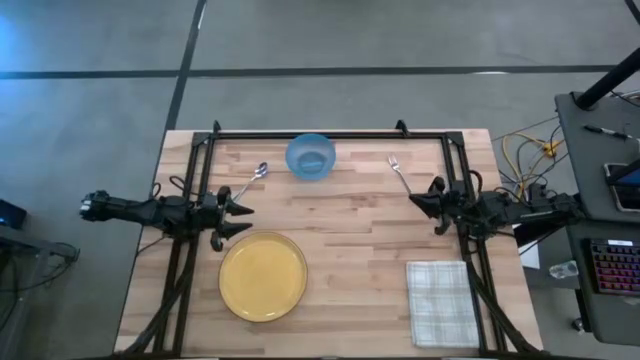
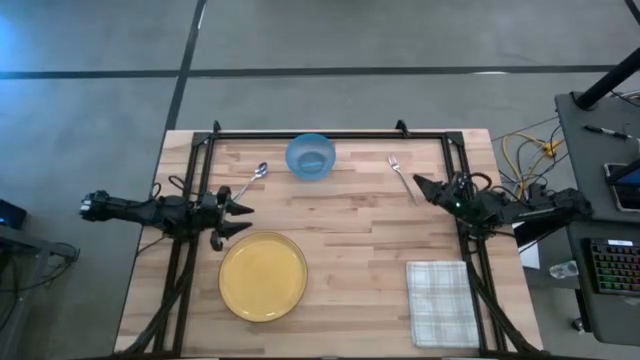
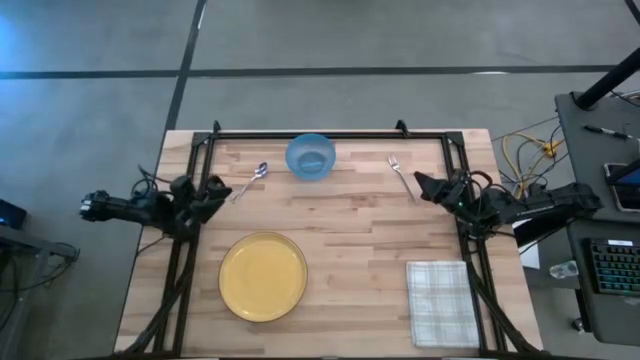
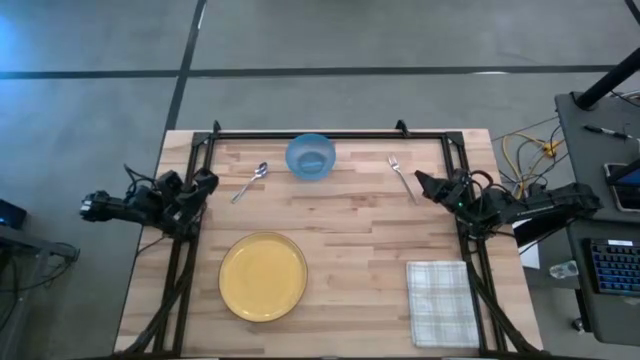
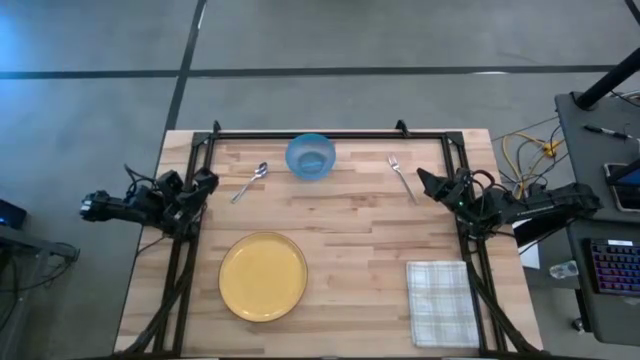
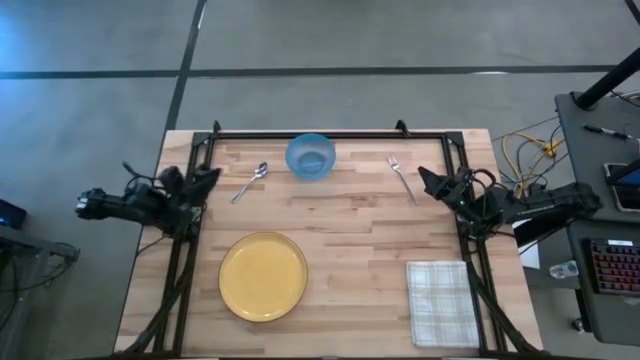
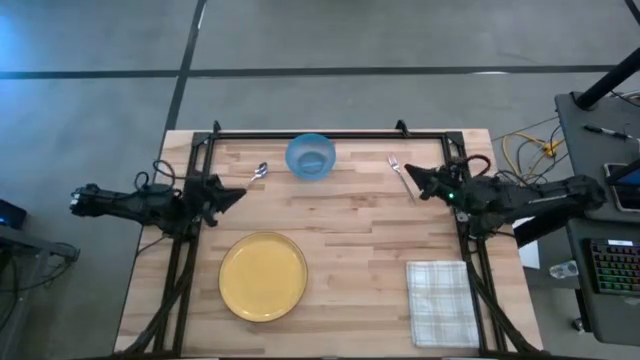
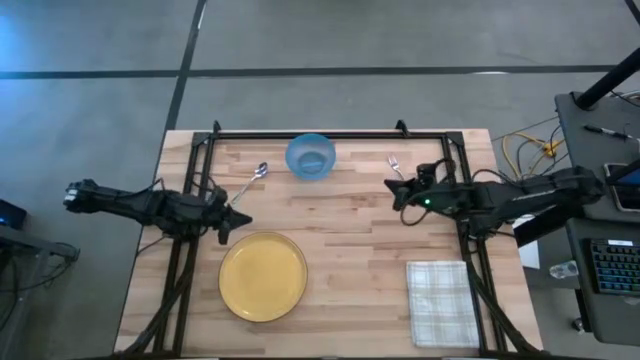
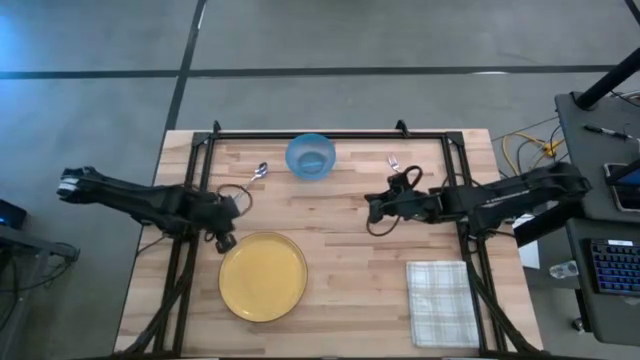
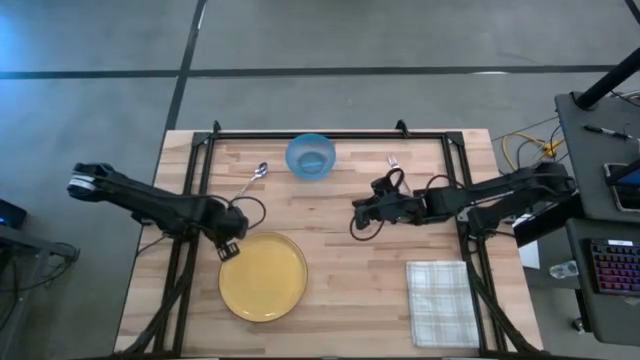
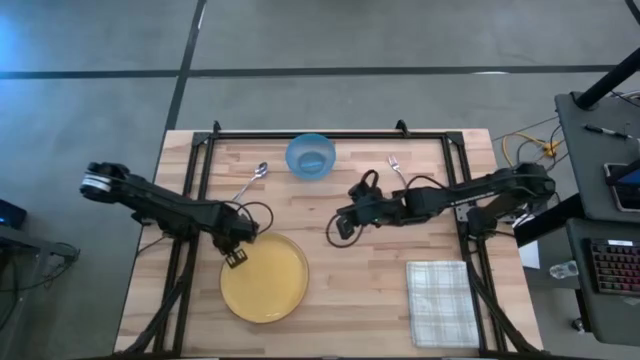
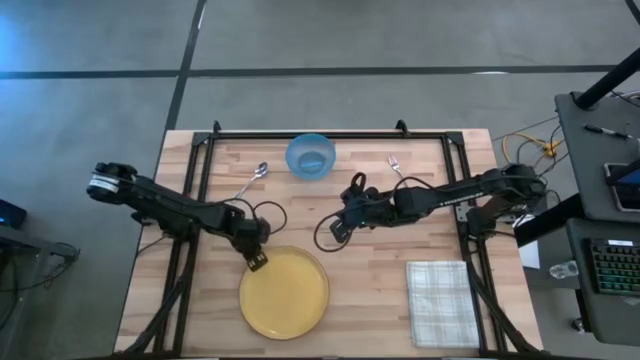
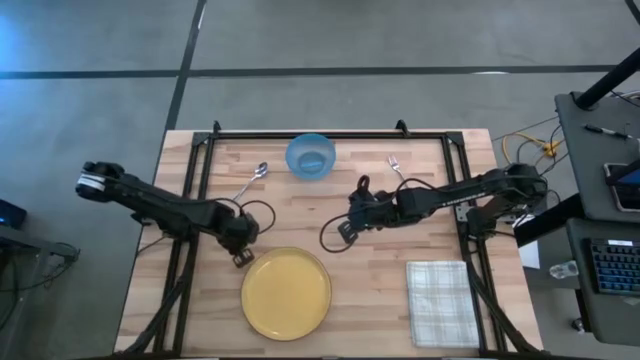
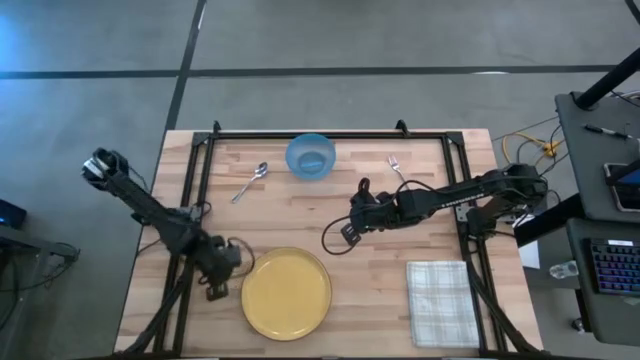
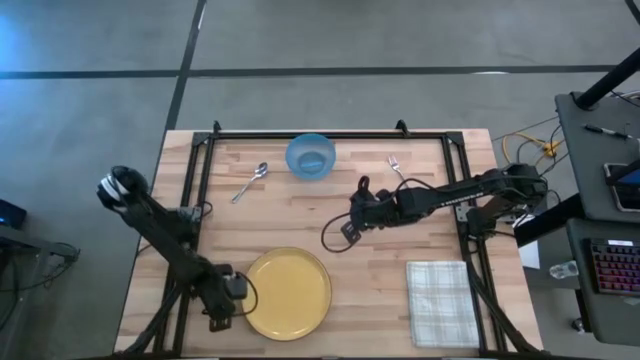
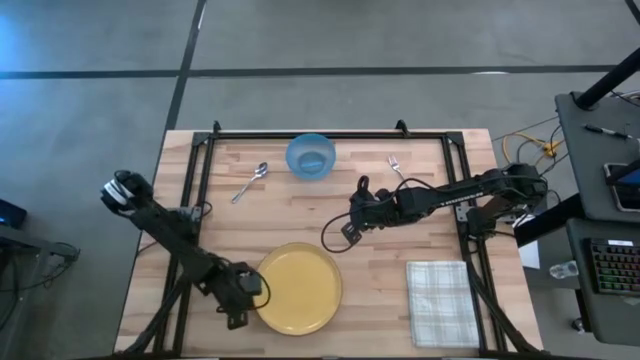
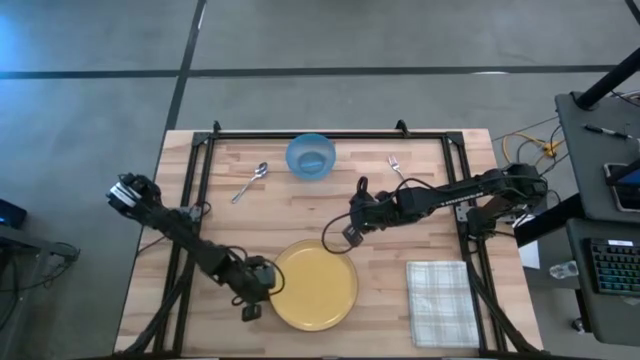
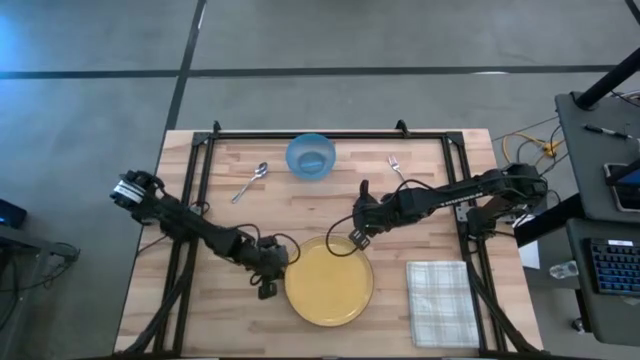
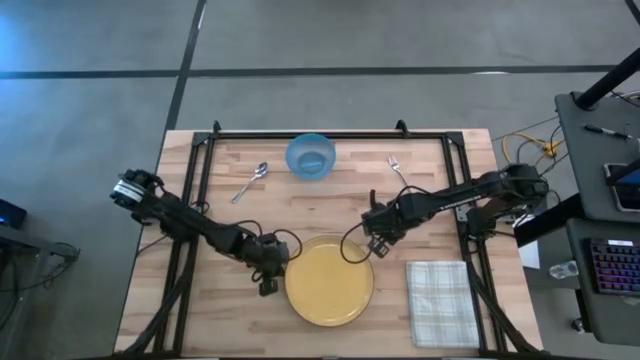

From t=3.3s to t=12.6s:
Task: Set table place
Move the yellow plate to the bottom center of the table

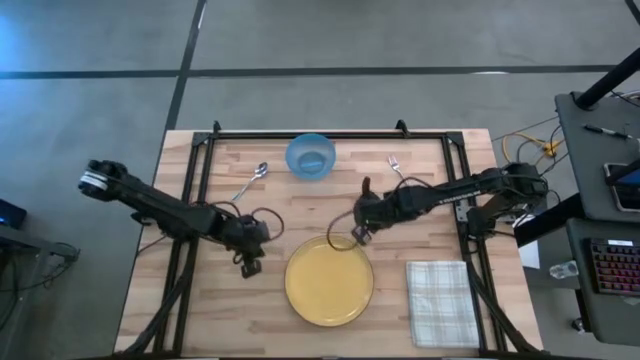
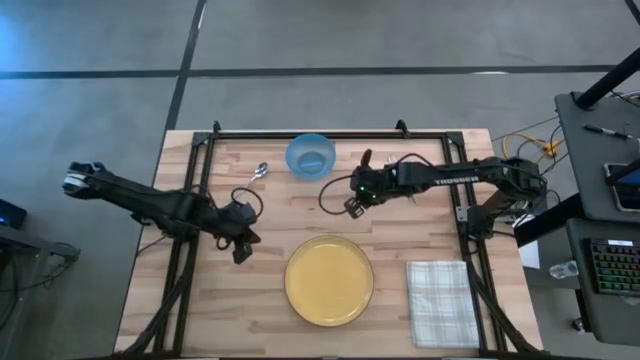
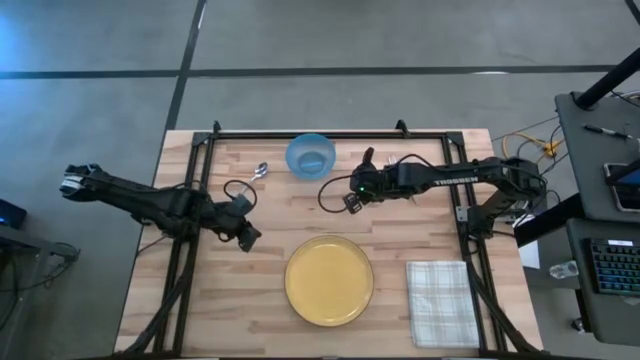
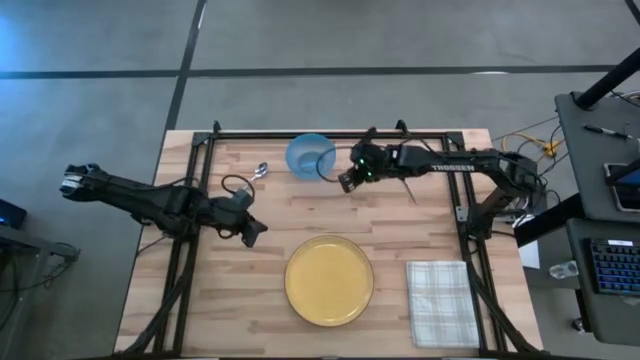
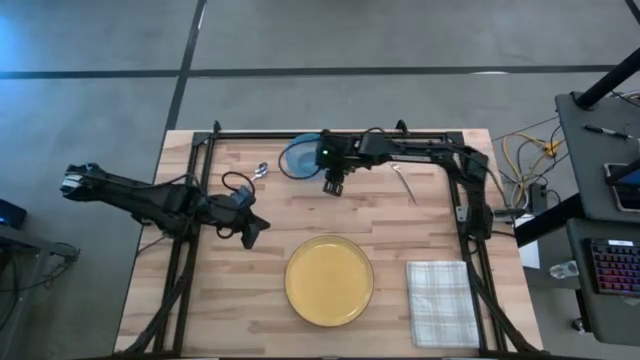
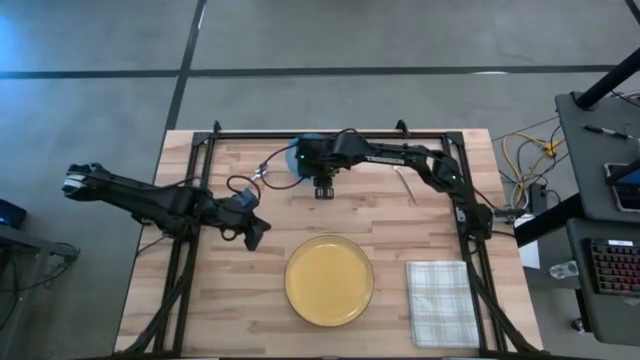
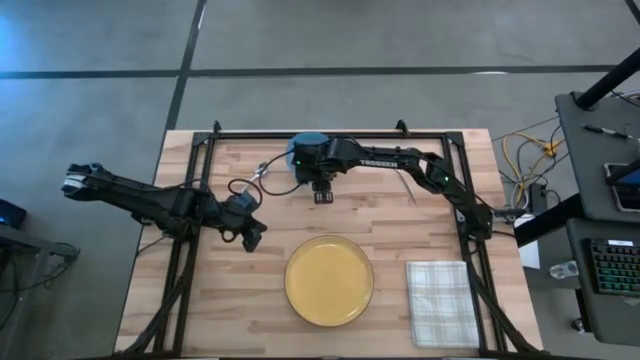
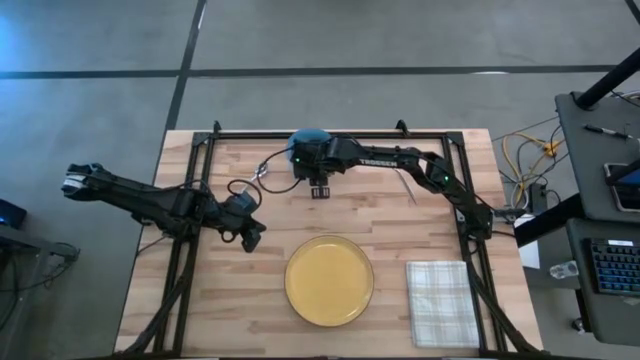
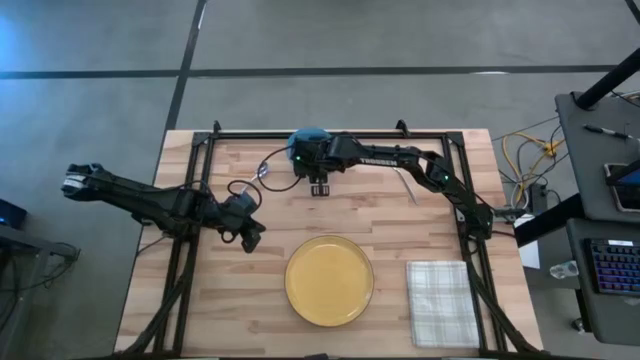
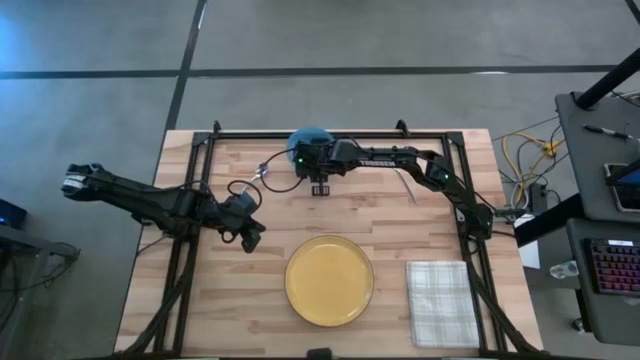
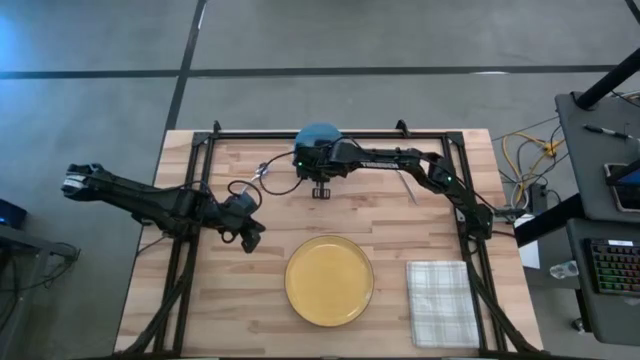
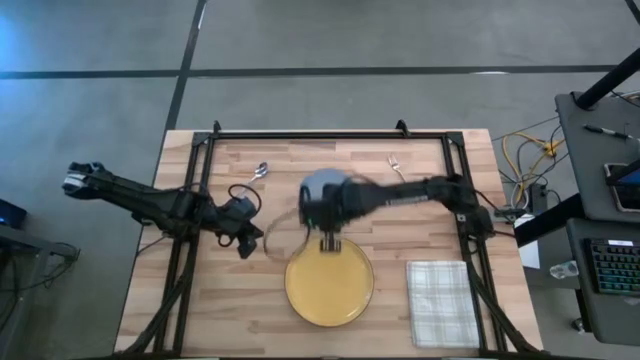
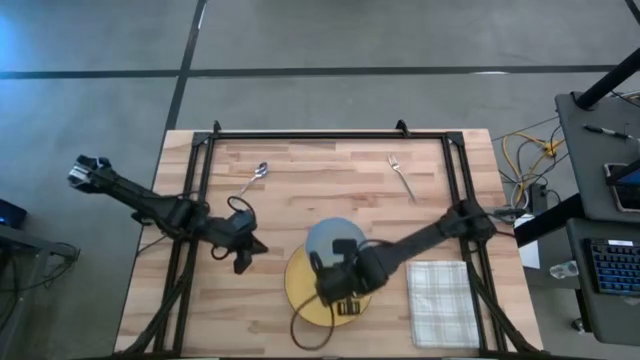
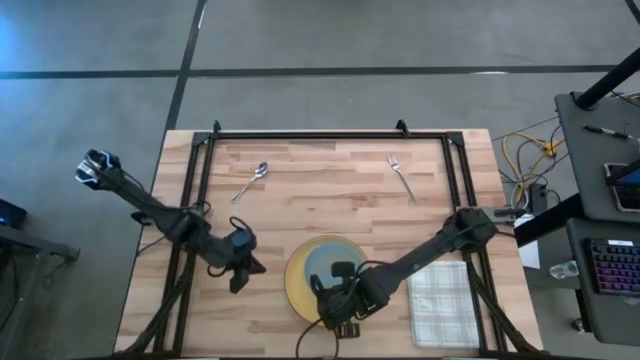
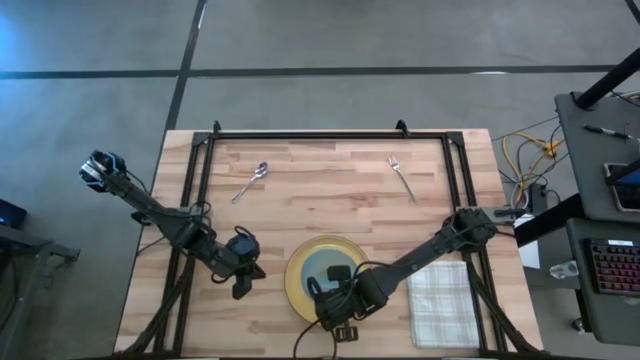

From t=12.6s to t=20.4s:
Put the blue bowl on top of the yellow plate

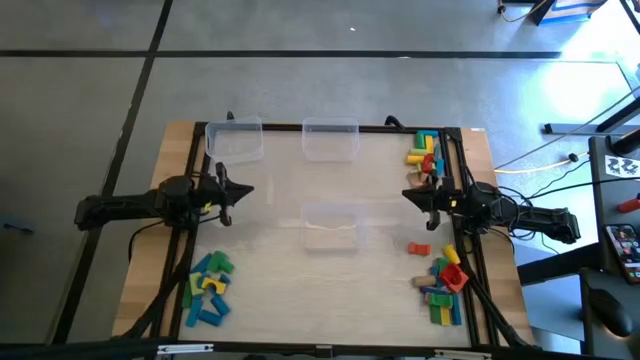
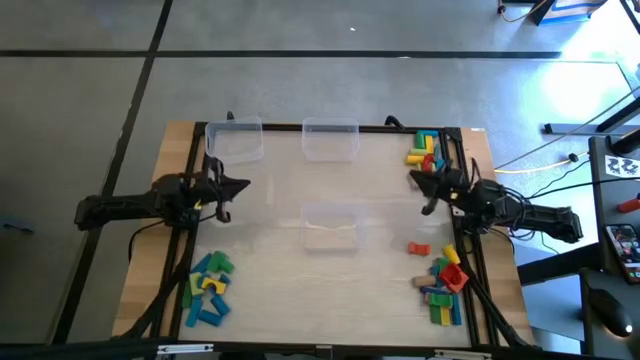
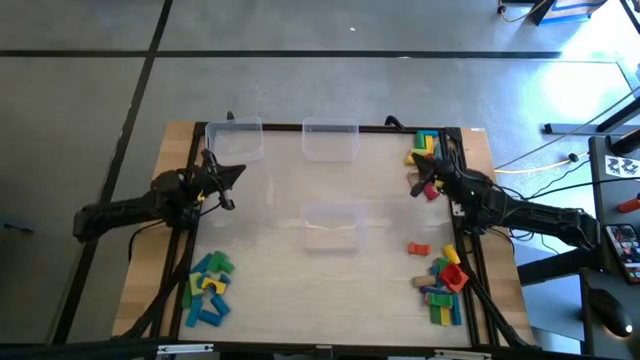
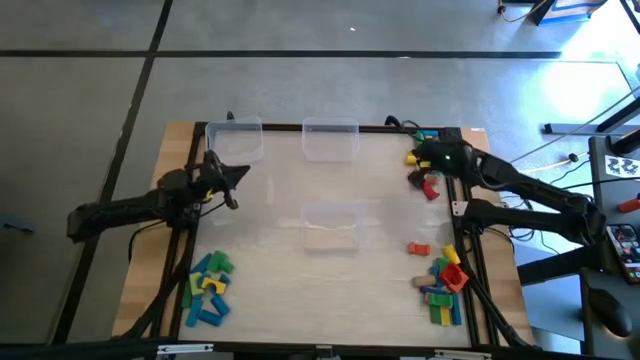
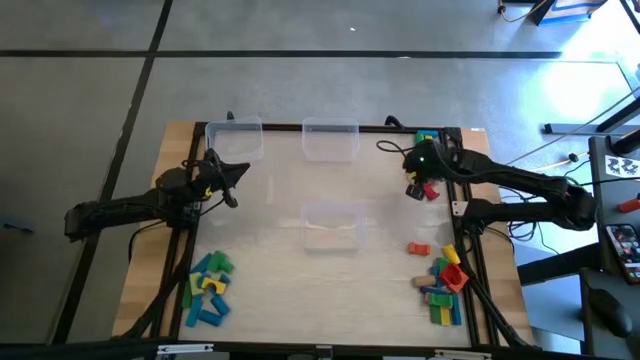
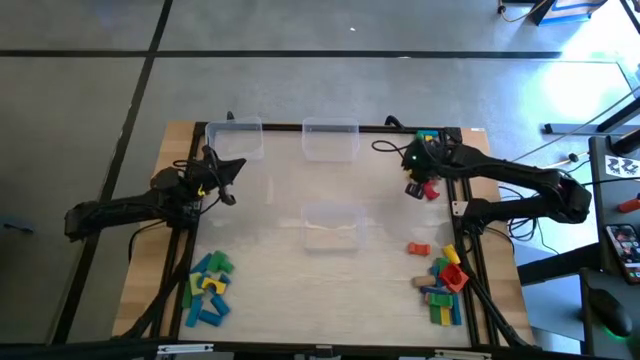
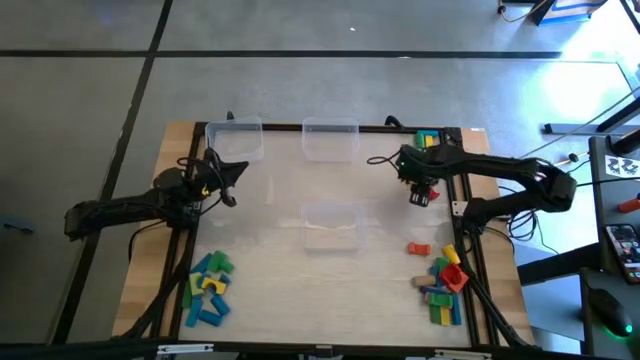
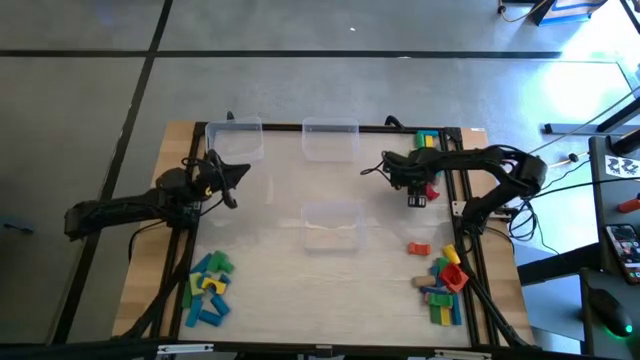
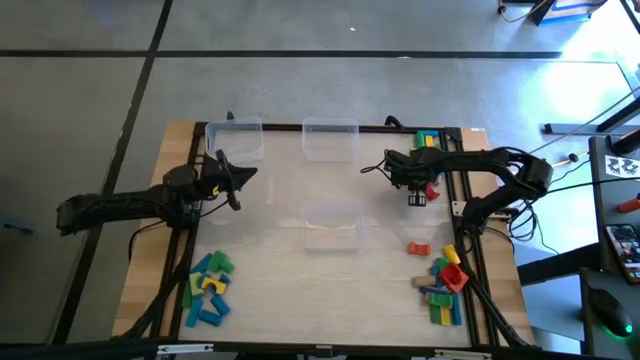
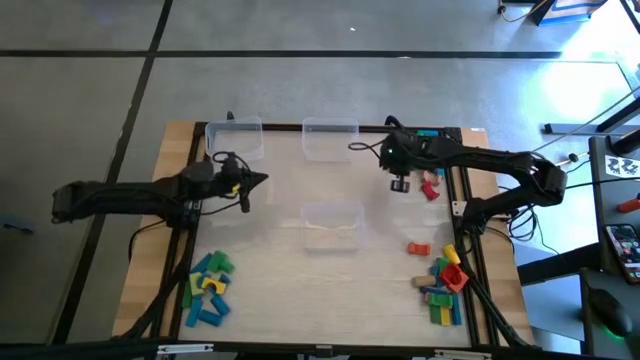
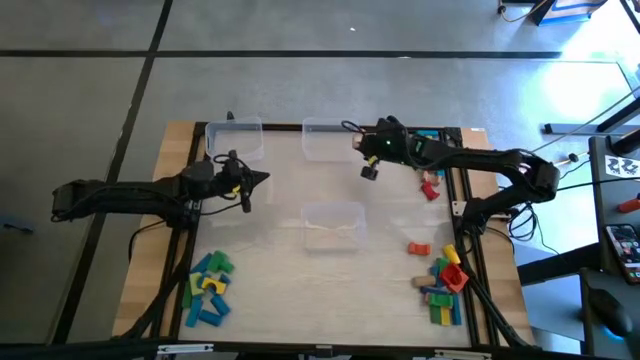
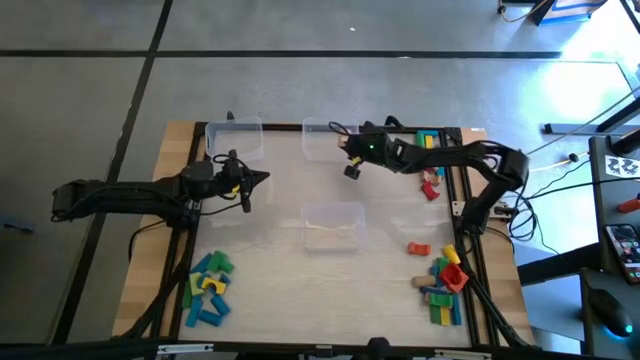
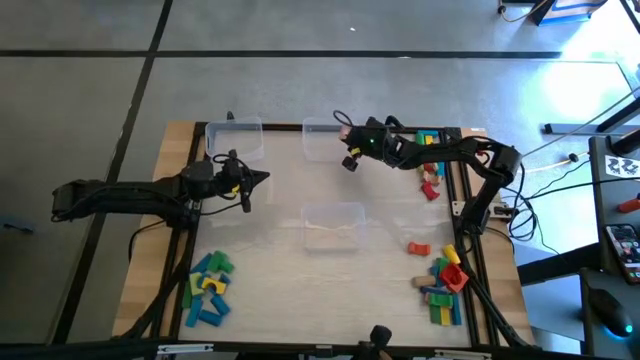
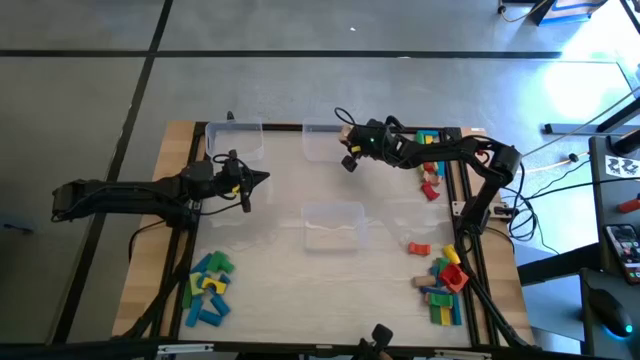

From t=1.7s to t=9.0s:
Task: Sort blocks by size
Put the brown arch block into the top right transparent bin
